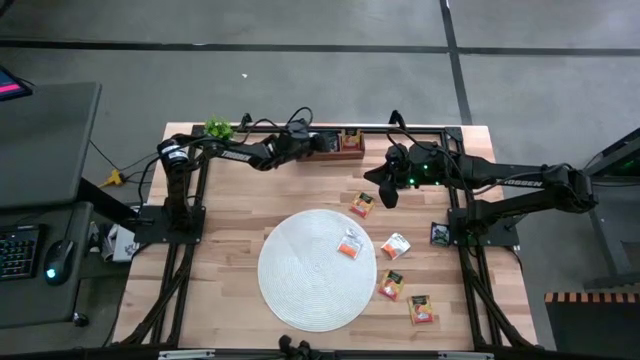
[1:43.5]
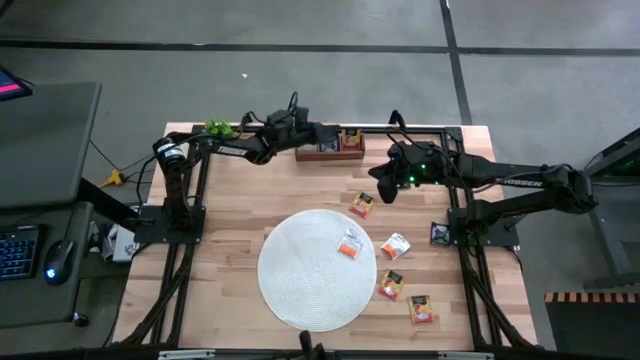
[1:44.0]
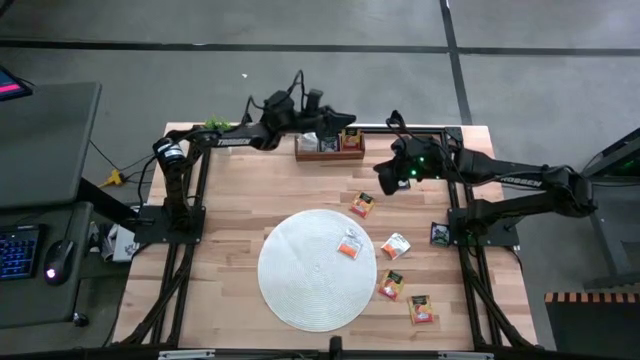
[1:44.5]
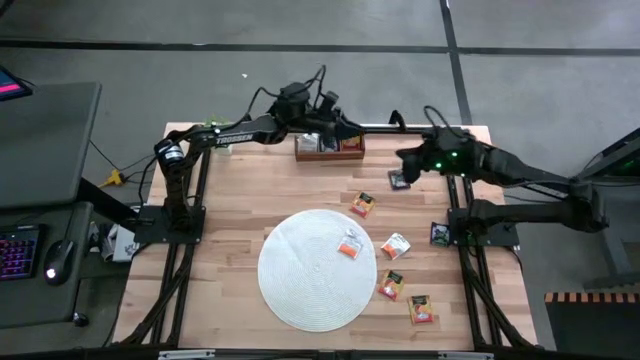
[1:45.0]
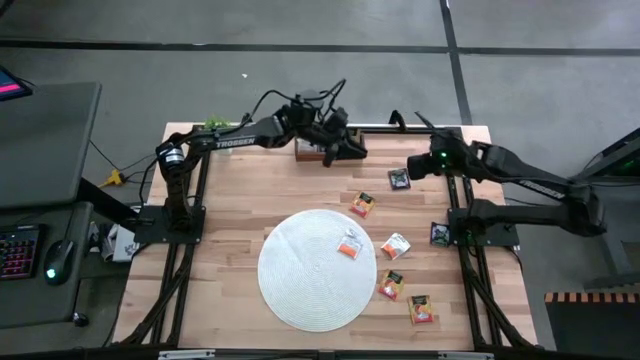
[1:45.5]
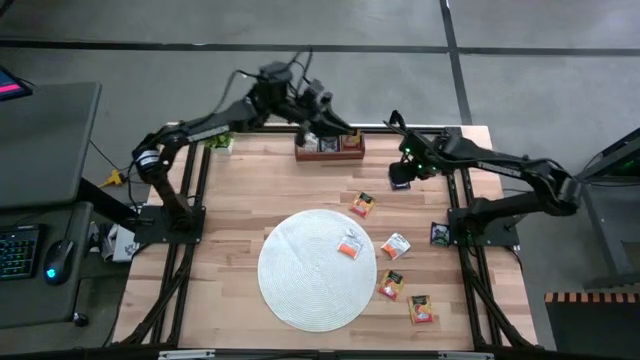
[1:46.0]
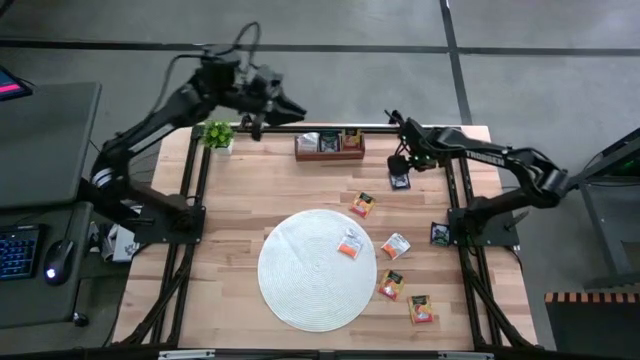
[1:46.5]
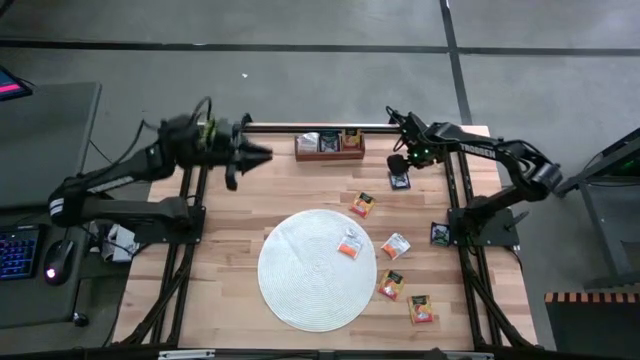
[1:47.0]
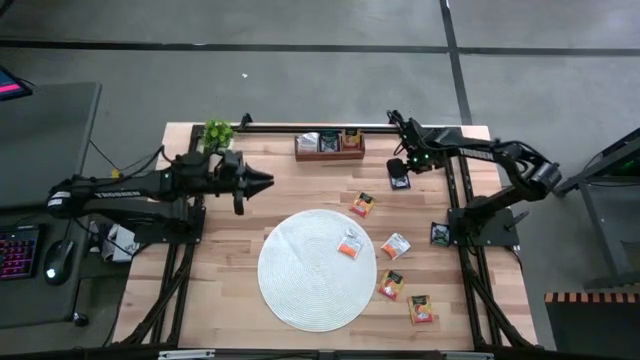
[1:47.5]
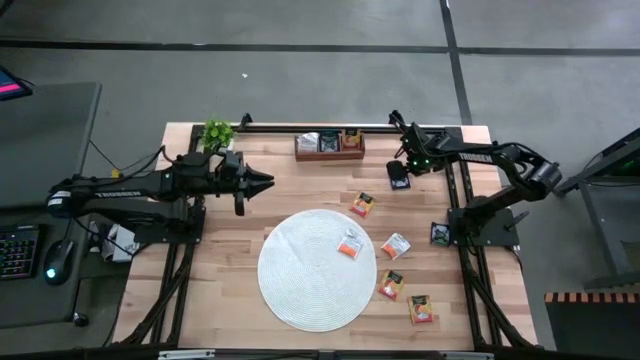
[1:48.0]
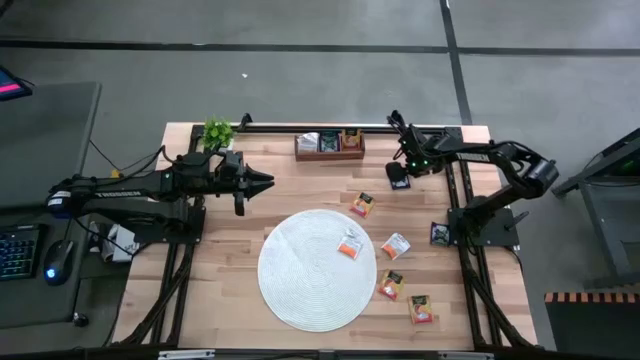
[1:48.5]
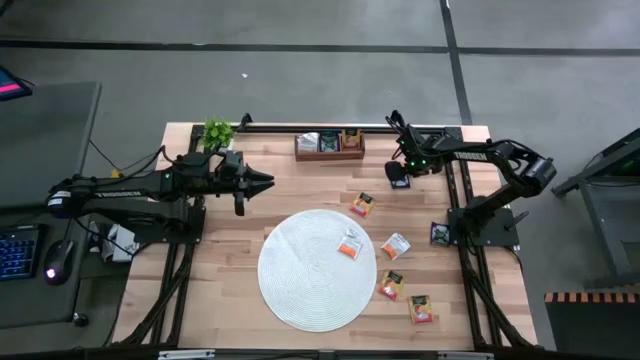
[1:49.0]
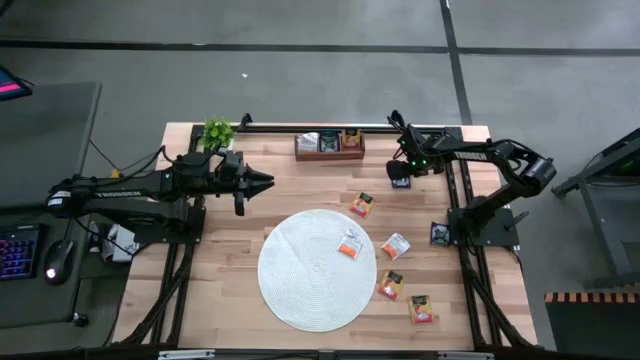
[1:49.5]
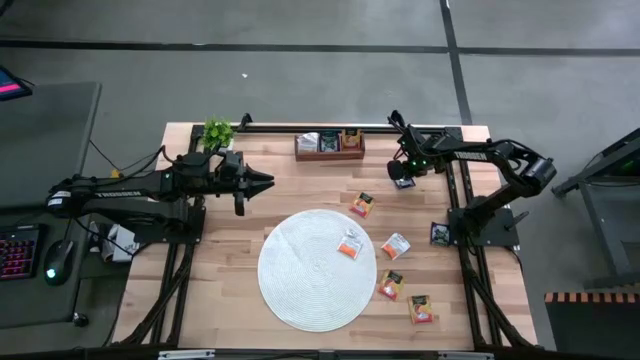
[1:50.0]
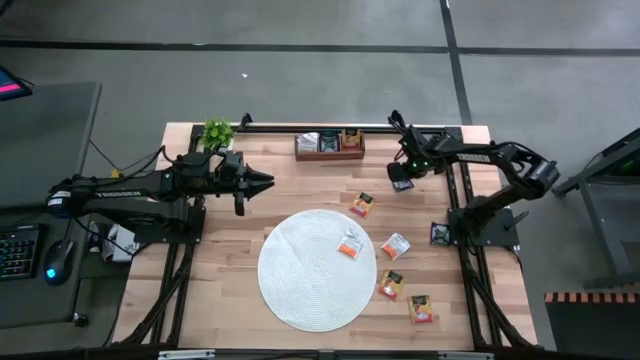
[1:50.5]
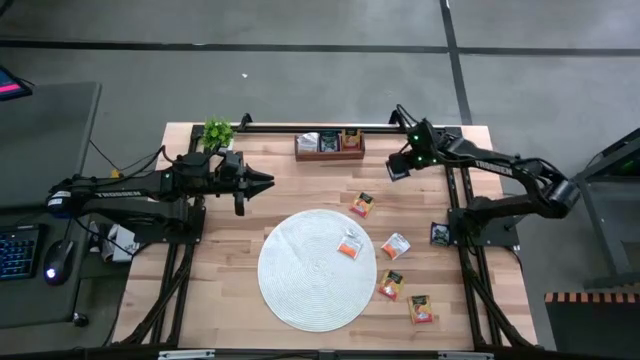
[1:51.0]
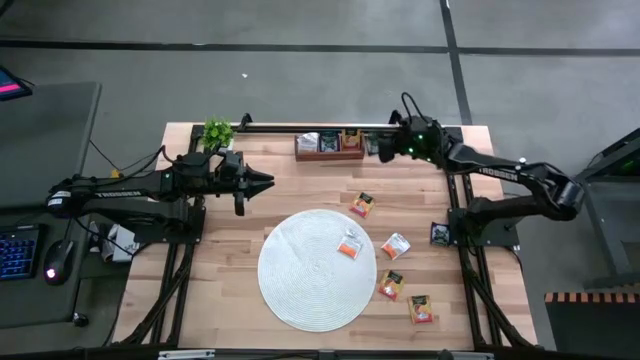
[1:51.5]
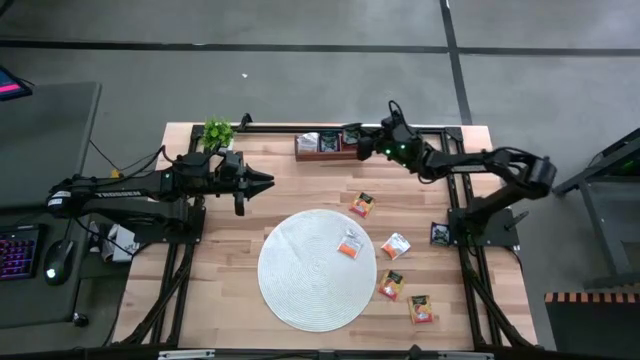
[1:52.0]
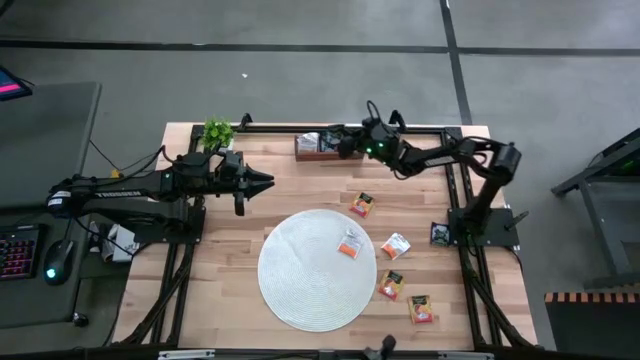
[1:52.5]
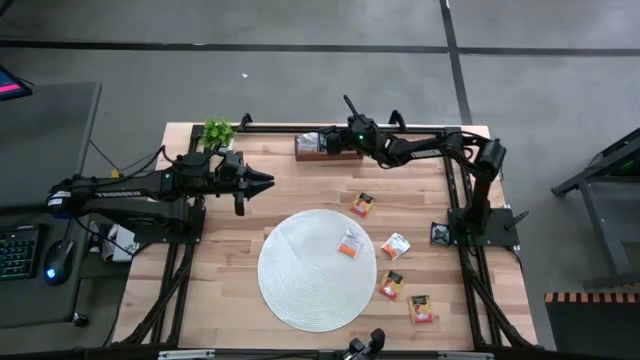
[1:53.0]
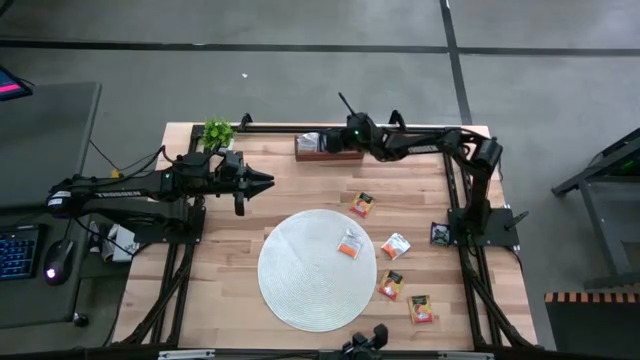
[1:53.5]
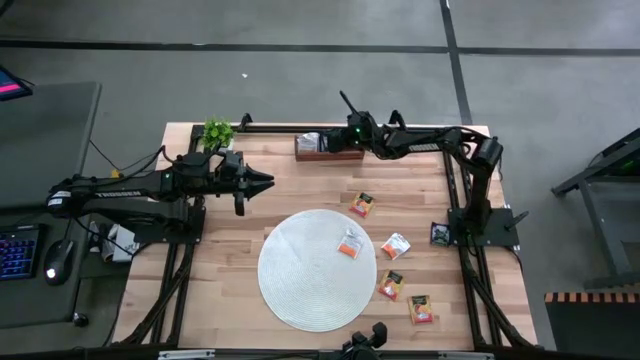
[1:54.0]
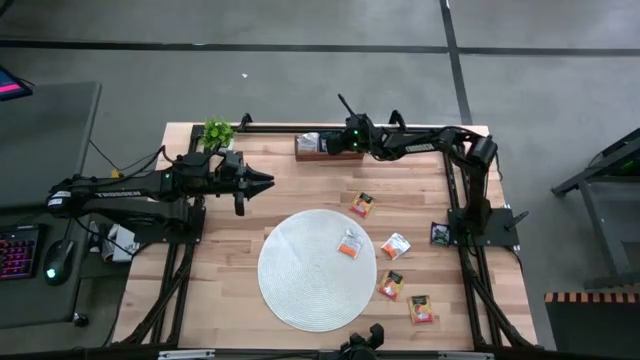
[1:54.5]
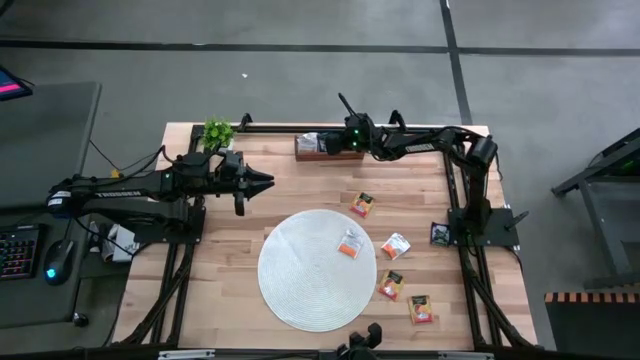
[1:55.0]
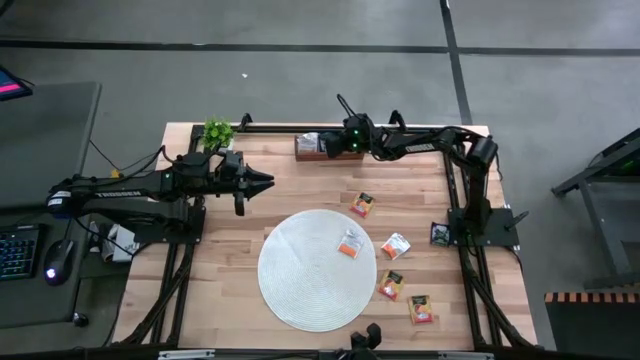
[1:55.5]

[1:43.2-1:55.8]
Task: Pick & Place Tea
Put the blue tea bag into the middle section of the wooden organizer

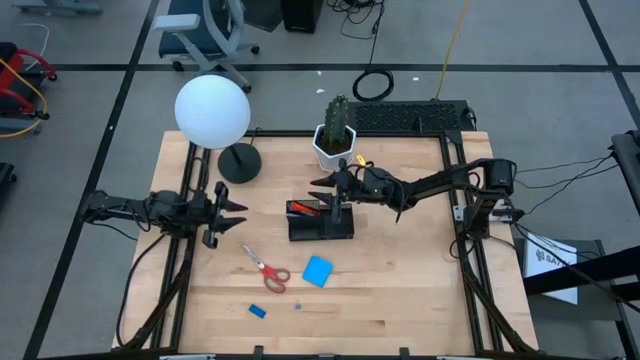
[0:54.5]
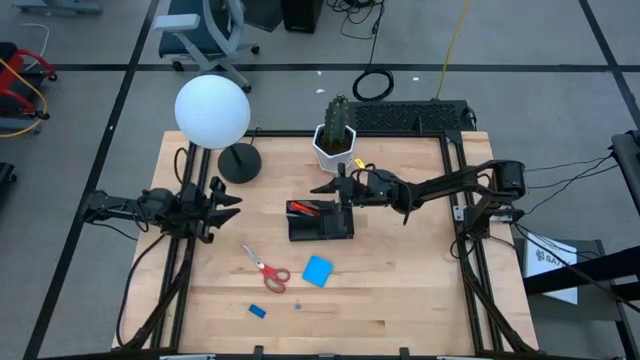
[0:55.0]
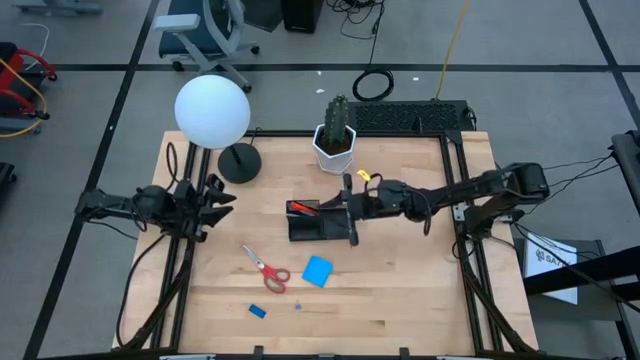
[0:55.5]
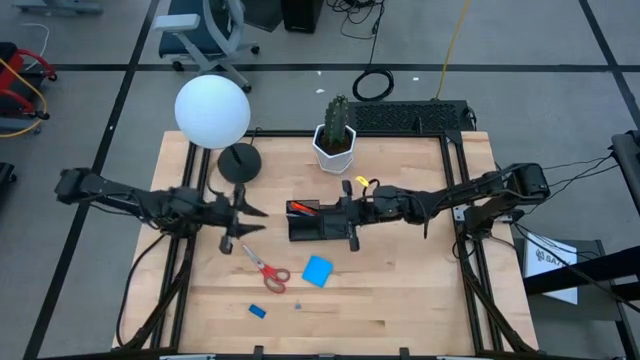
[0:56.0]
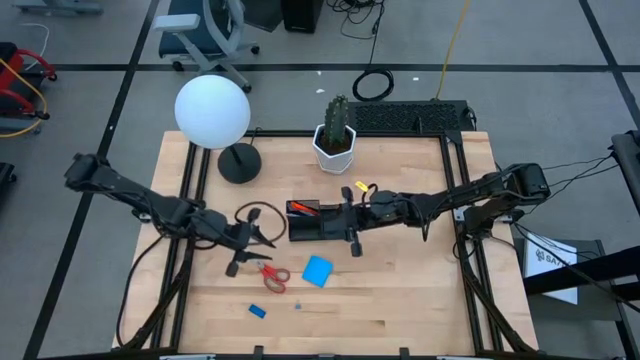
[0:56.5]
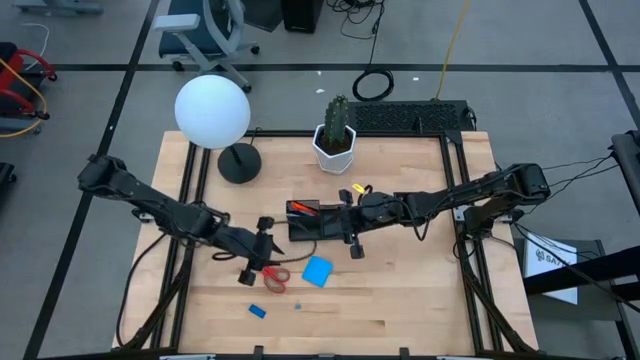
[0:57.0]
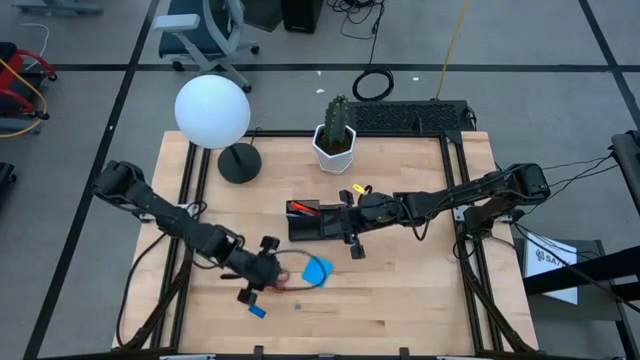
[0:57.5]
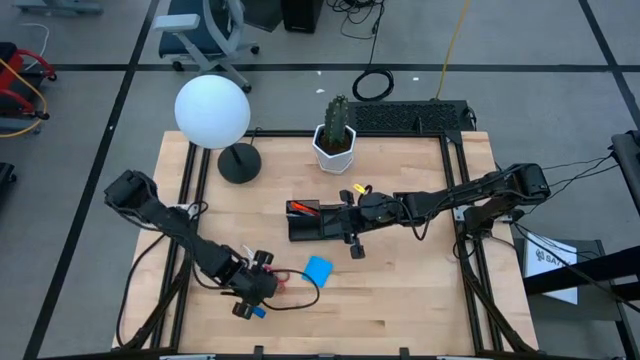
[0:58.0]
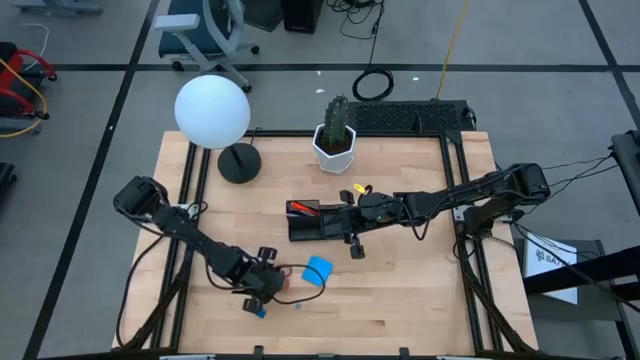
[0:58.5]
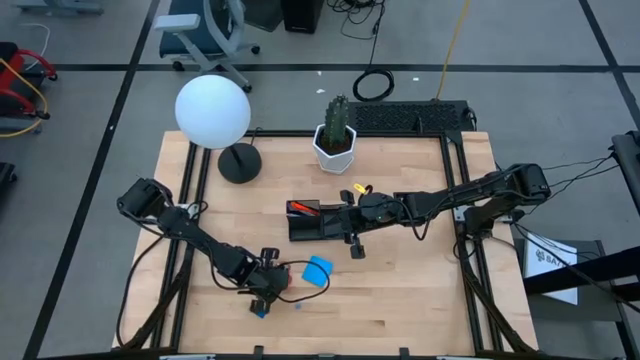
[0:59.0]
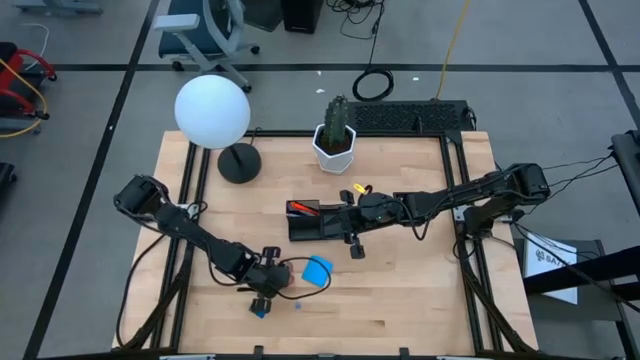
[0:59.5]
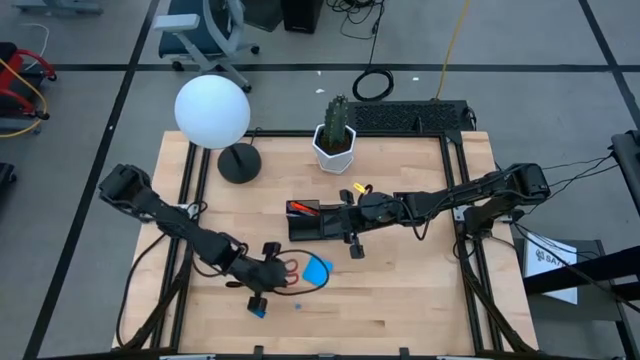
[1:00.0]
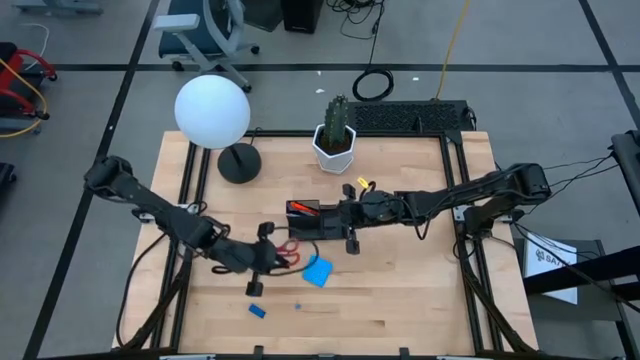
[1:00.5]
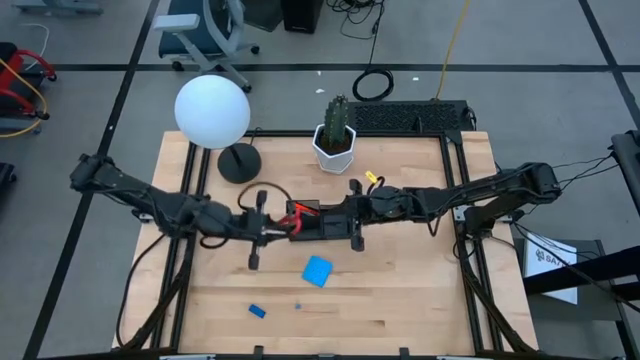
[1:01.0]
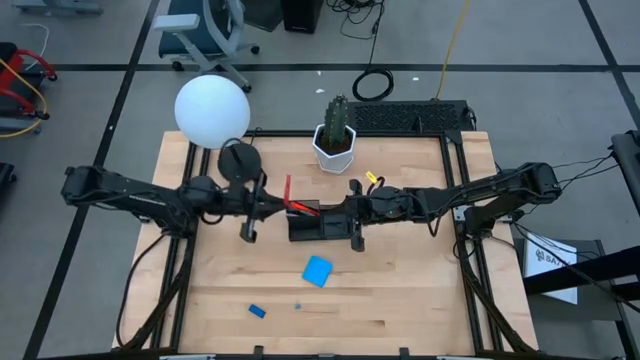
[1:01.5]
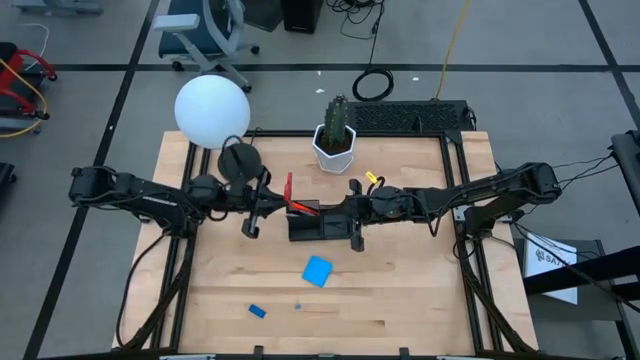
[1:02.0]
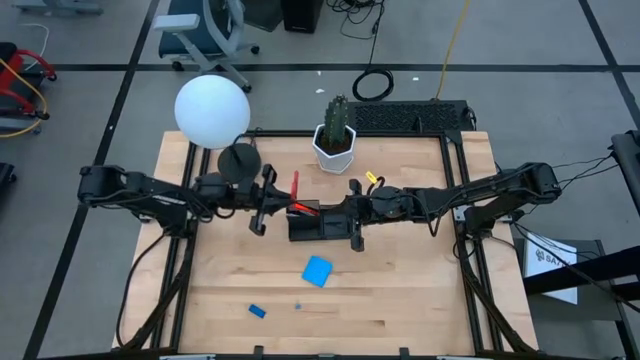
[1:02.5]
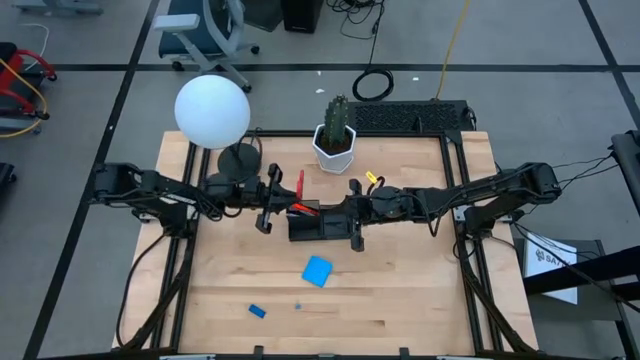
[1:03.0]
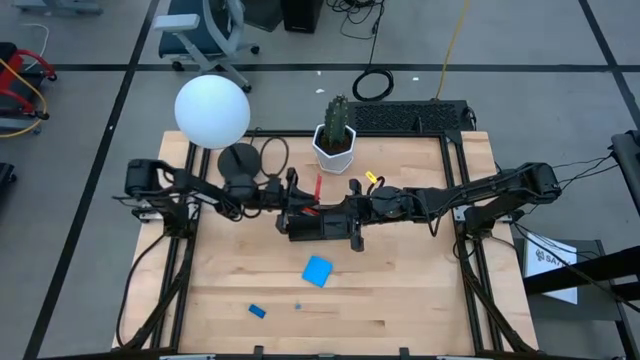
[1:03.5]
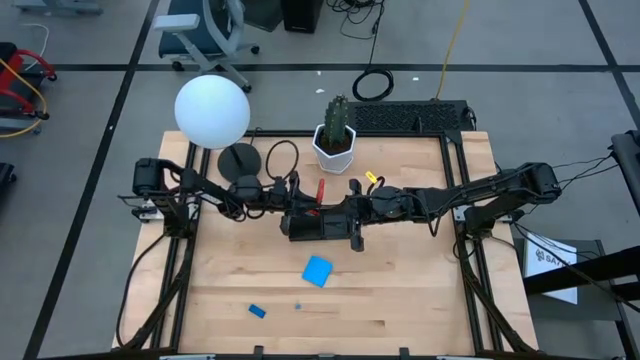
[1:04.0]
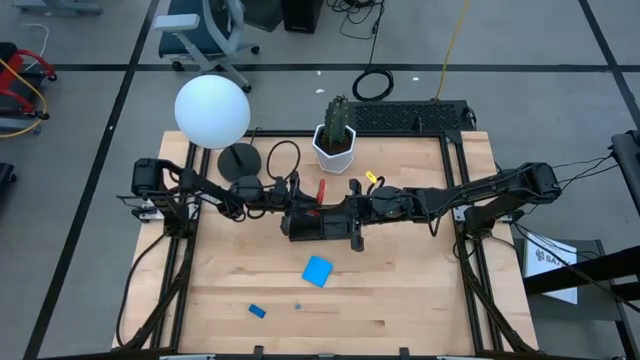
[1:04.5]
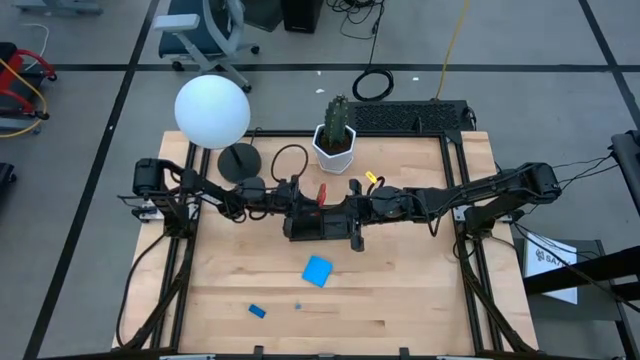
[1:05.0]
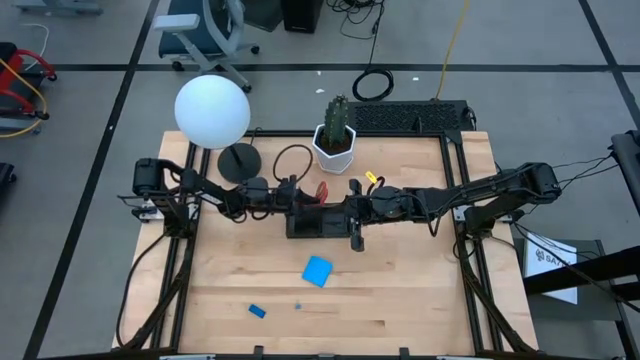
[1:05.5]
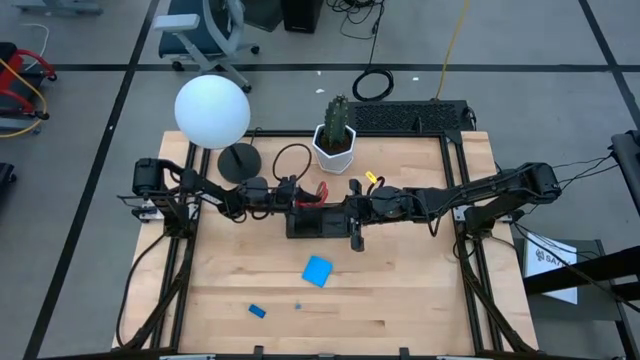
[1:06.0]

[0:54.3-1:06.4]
Task: Pick and place office supplies into organizer
Put the scissors into the black desk organizer
